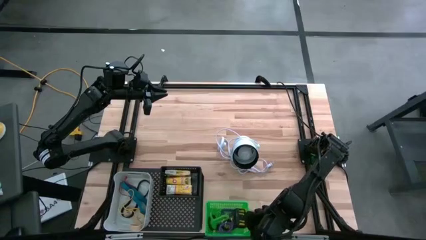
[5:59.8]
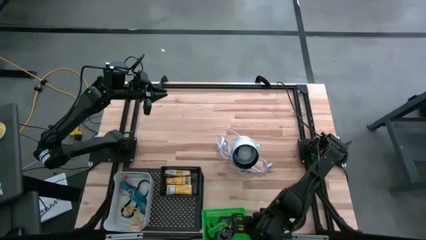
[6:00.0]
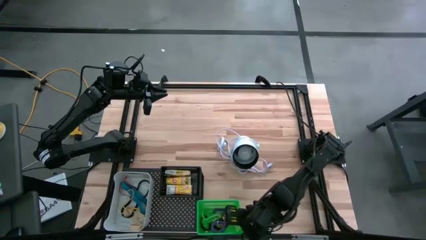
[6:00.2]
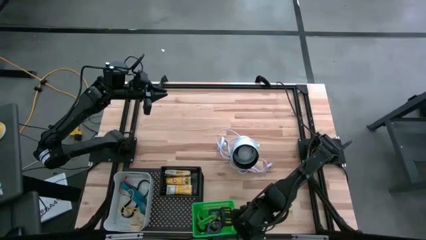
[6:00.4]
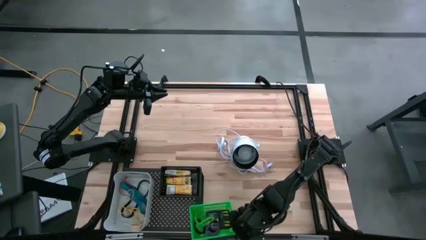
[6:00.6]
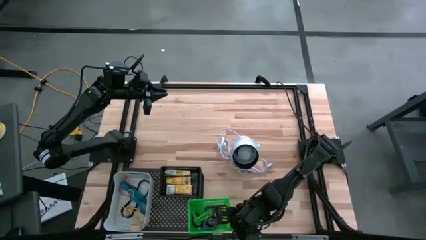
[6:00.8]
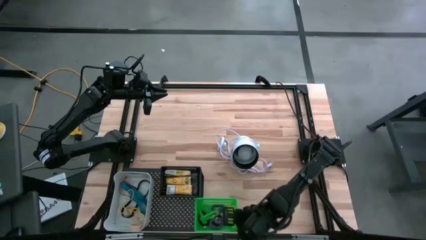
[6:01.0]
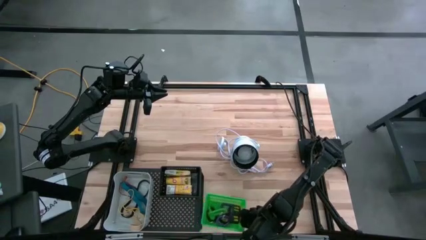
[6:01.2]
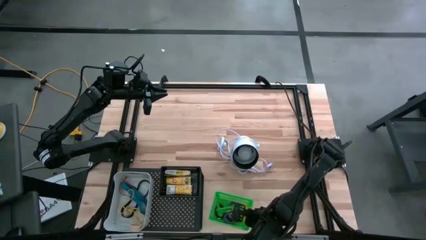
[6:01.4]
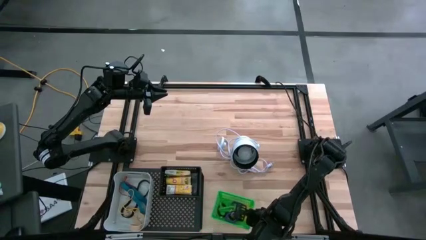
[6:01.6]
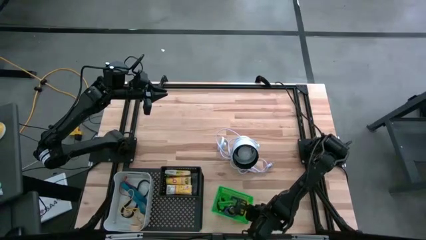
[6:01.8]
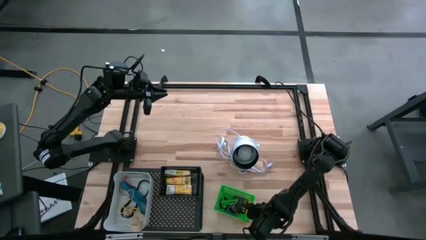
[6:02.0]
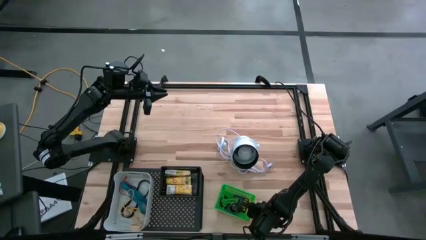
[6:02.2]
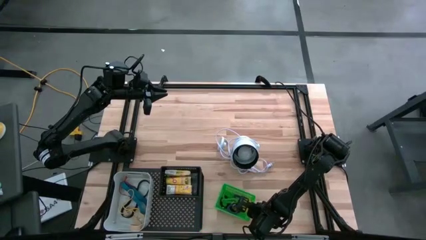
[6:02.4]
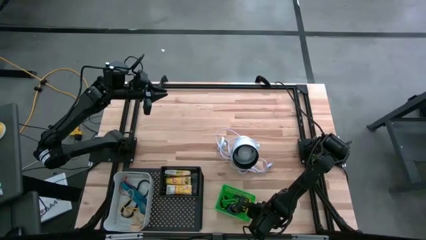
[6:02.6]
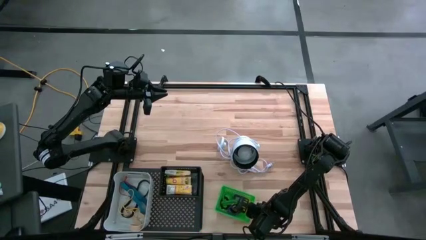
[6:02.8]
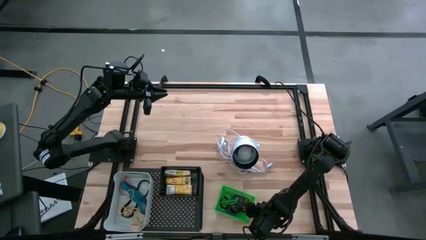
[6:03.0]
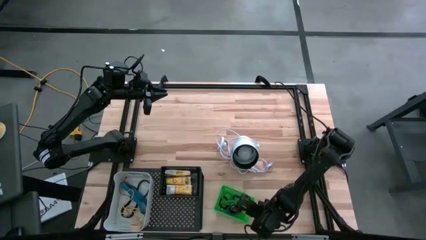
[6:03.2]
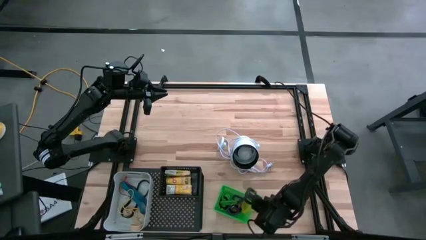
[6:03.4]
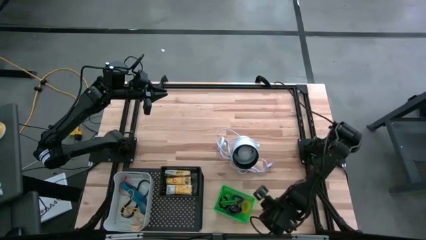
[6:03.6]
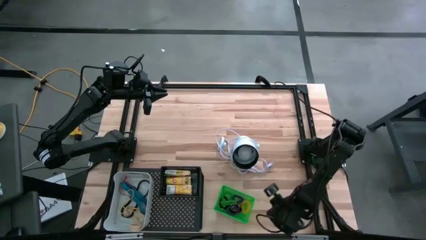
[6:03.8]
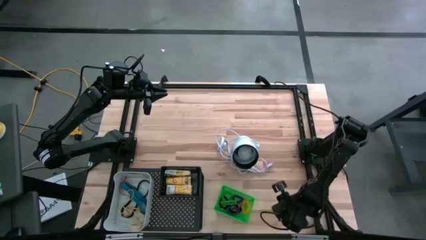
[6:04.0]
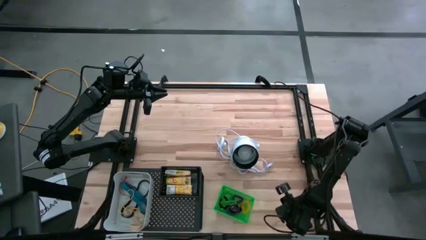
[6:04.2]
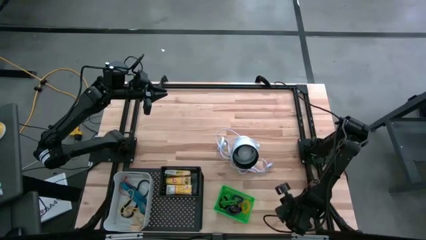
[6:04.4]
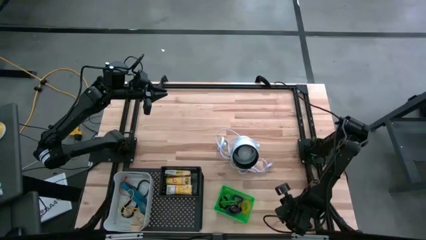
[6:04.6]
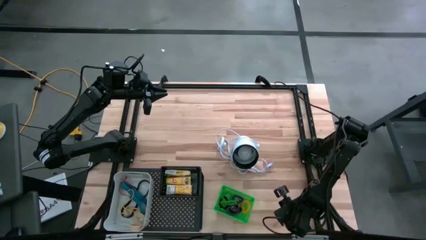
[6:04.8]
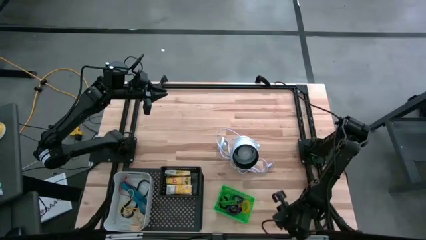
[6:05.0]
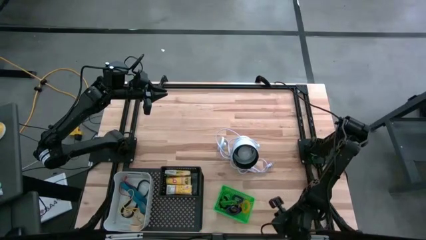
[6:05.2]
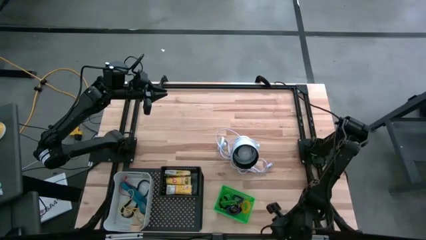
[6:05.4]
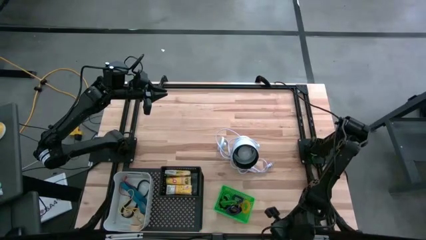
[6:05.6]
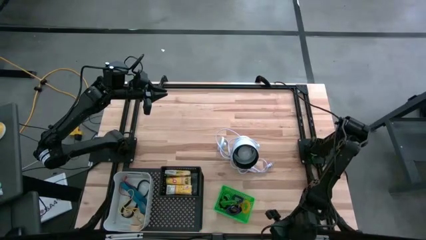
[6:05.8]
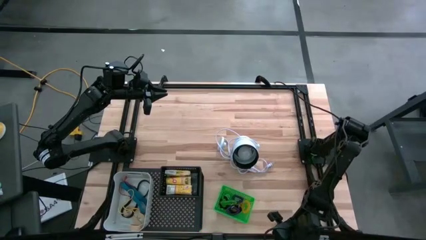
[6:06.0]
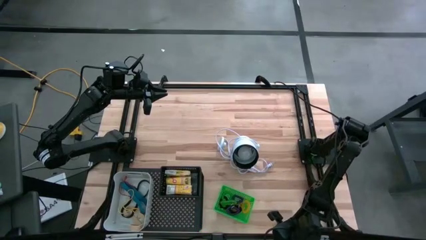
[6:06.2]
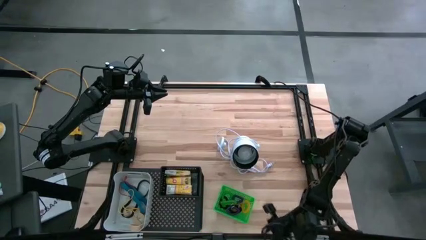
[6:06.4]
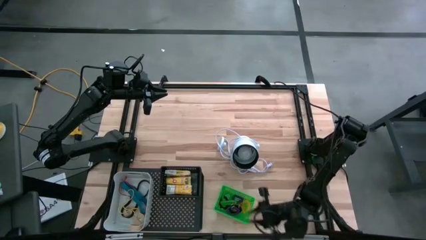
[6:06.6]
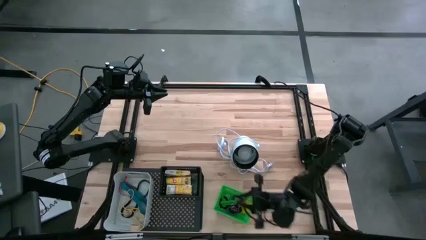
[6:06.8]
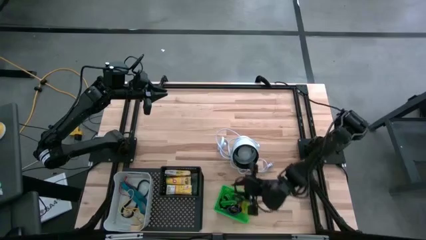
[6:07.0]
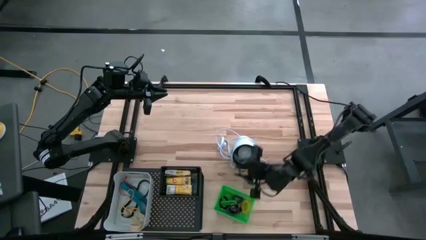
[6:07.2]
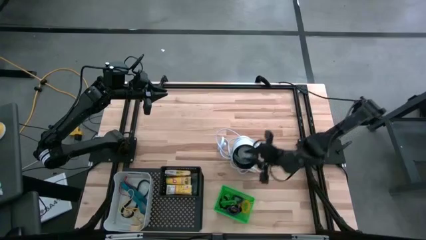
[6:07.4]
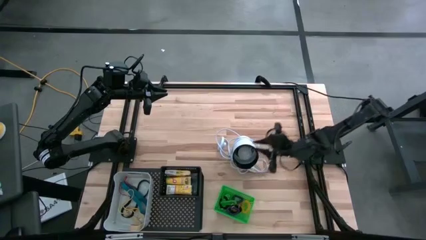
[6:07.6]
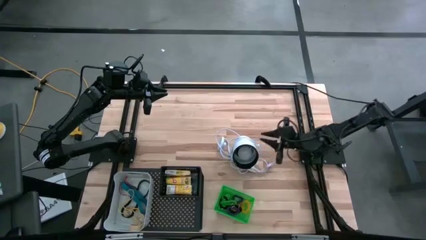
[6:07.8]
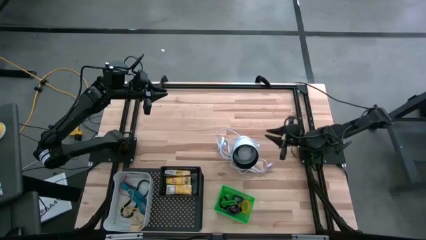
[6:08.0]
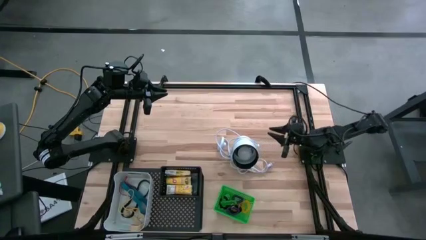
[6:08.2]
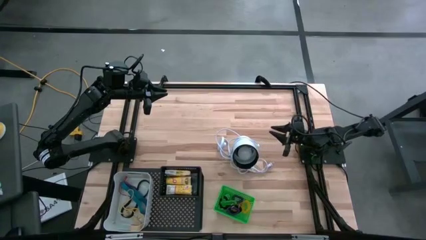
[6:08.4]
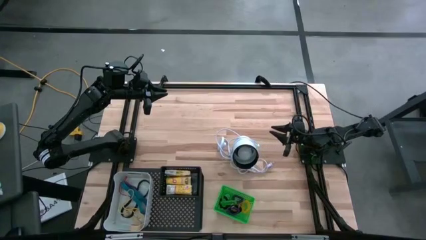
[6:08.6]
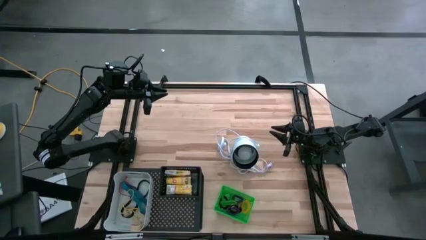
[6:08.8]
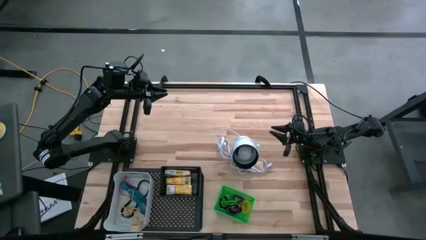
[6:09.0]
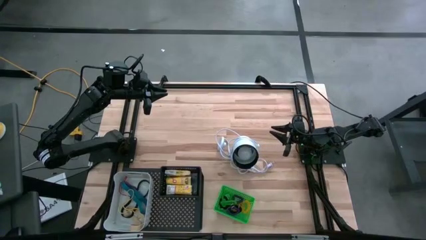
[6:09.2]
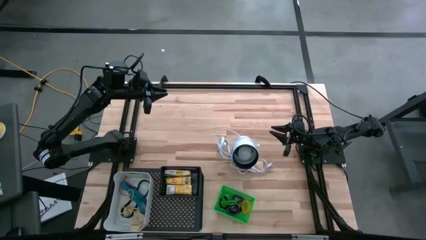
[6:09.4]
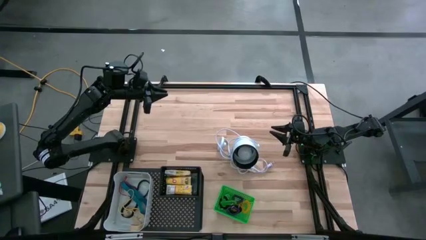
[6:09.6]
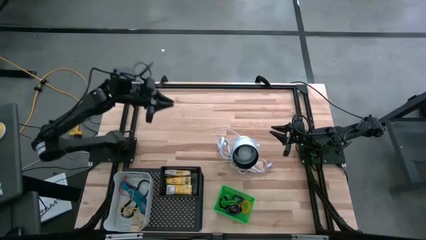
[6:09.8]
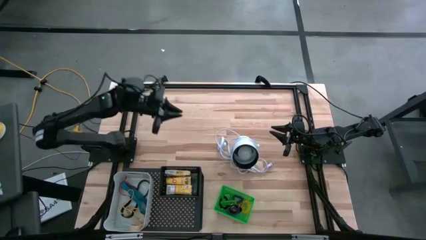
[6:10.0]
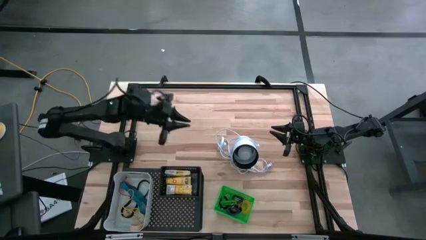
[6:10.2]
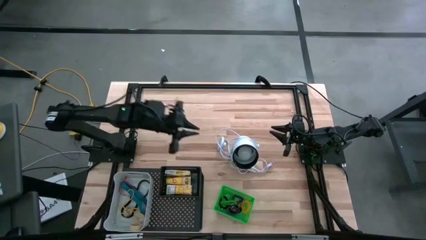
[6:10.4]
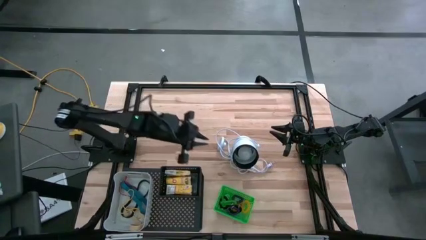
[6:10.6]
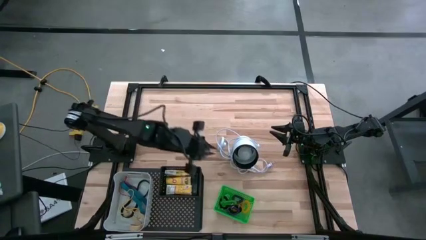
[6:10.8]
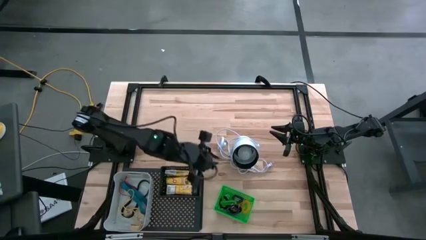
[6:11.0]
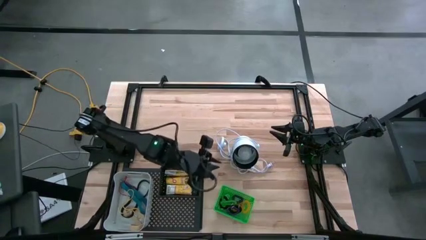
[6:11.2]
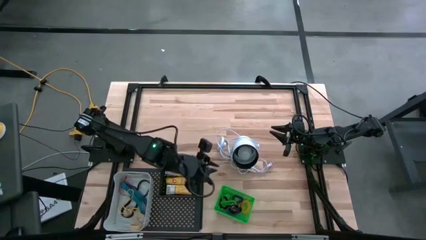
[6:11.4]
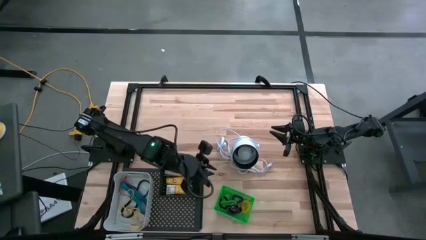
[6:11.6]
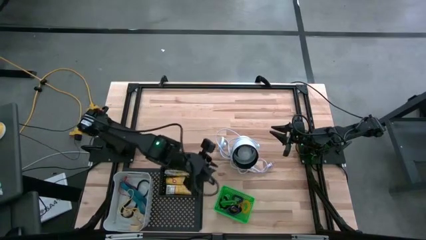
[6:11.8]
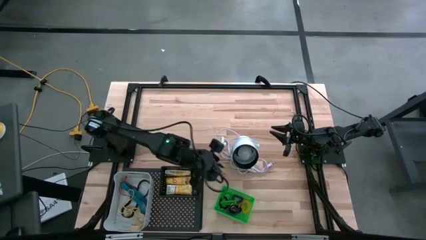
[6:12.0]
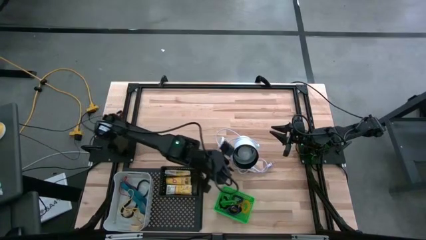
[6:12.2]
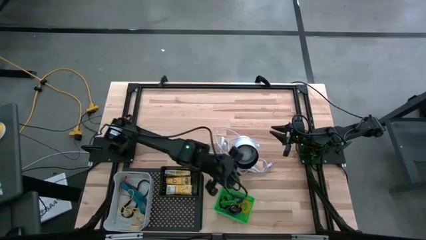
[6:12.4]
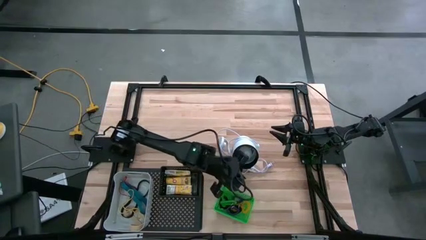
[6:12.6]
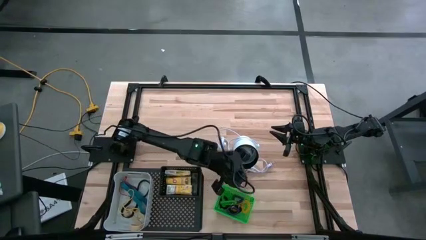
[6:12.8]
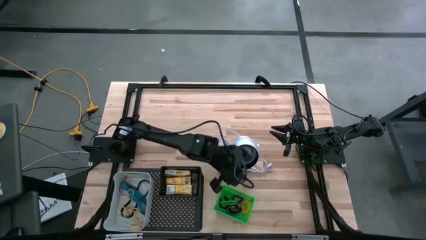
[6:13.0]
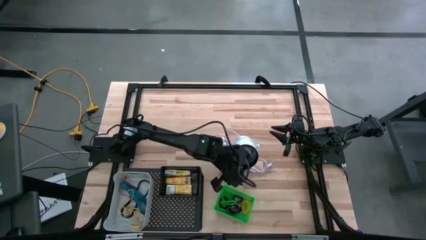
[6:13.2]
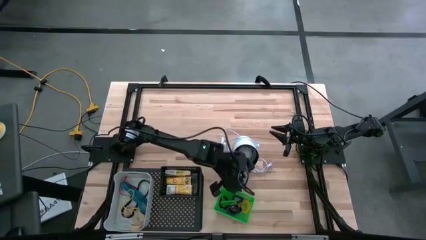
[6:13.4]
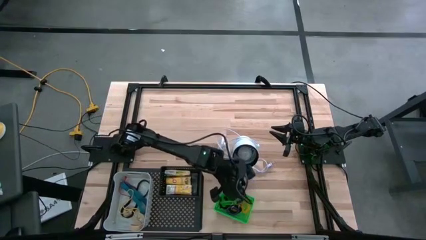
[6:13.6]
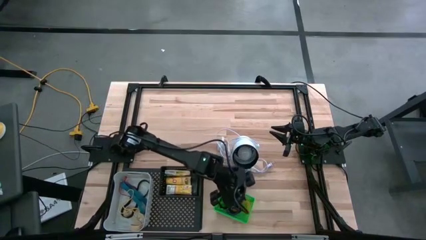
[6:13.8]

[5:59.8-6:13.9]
Task: Pick & Place Office Desk Supplies
Put the green bin on the shelf

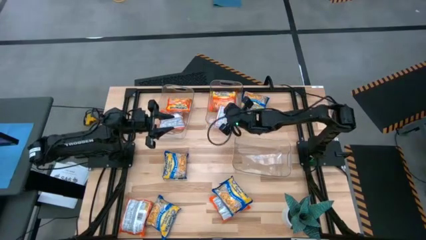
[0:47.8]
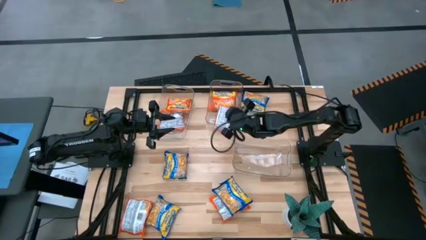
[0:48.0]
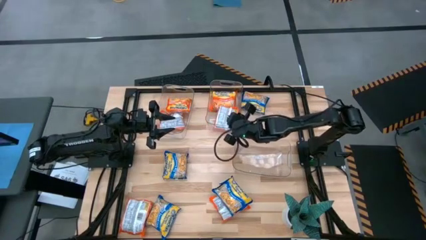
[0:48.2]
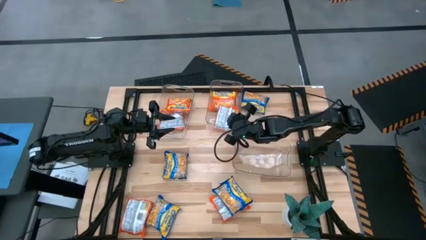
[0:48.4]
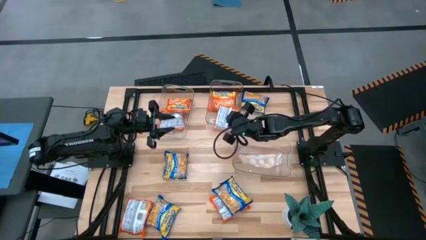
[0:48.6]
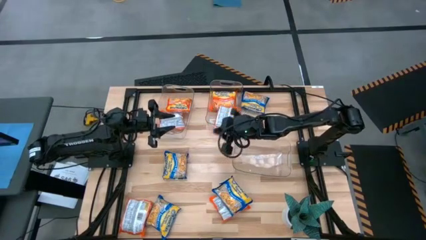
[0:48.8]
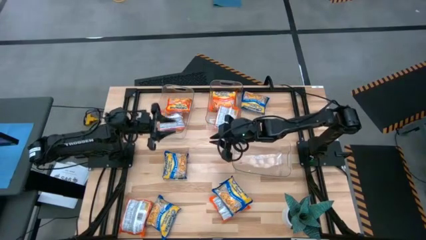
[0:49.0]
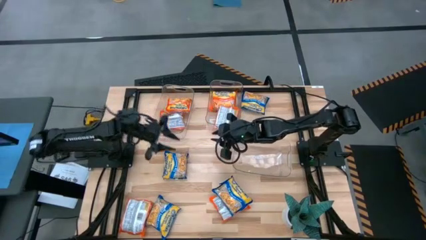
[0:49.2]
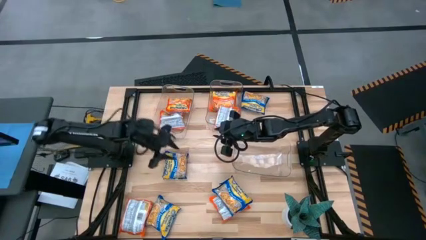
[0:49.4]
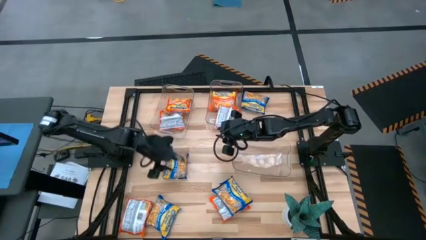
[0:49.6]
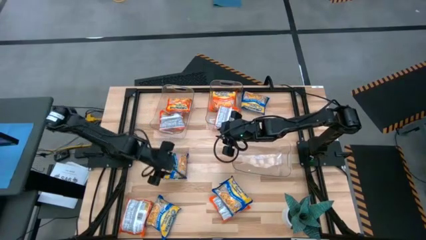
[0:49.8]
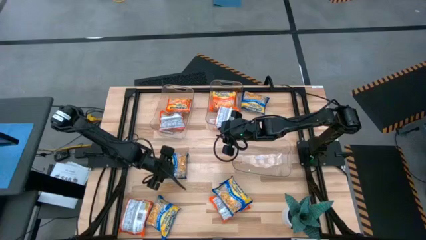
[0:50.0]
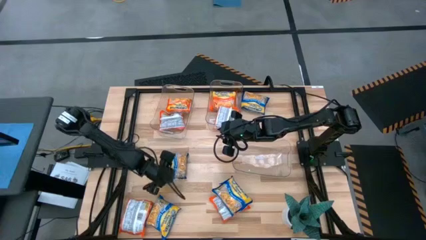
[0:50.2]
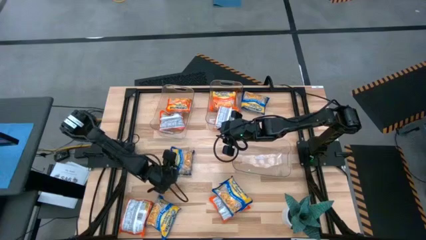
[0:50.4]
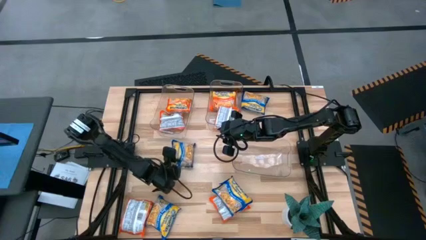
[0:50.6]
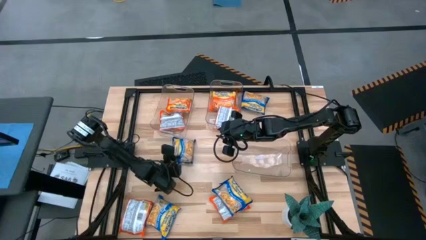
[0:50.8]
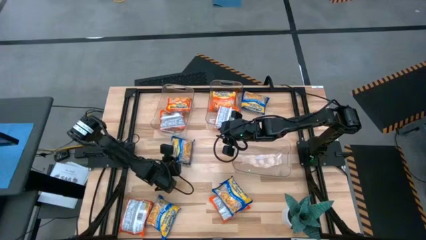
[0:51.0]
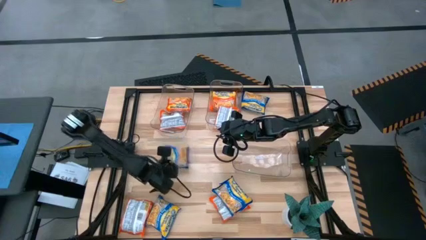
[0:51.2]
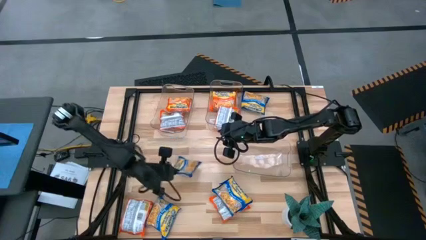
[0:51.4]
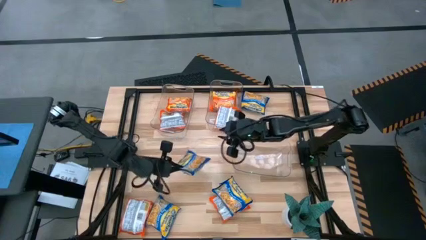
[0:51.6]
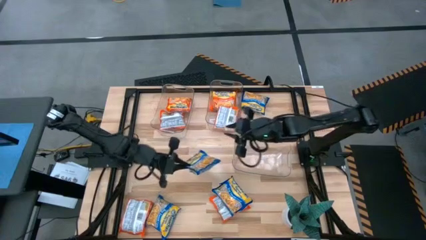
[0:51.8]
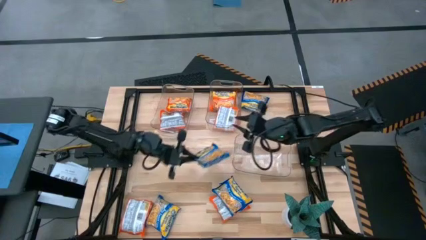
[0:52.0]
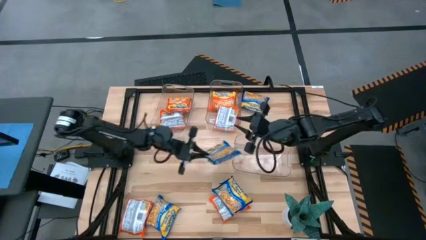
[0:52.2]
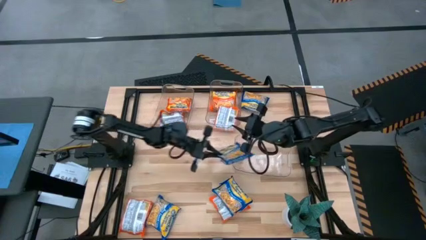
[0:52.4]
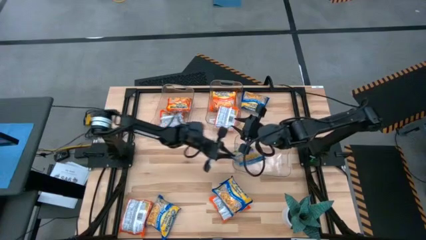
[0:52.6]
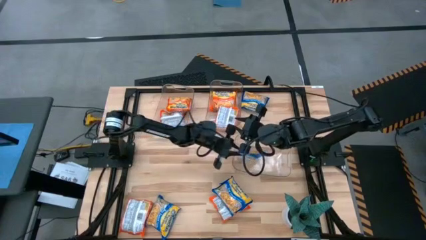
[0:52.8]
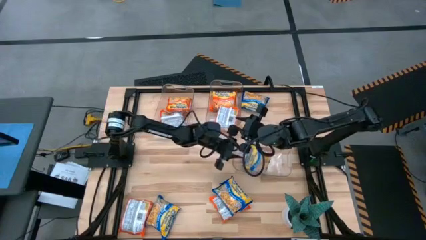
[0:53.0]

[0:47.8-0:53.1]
Task: Sort Maruchan noodles
Put the blue bag into the right transparent bin
